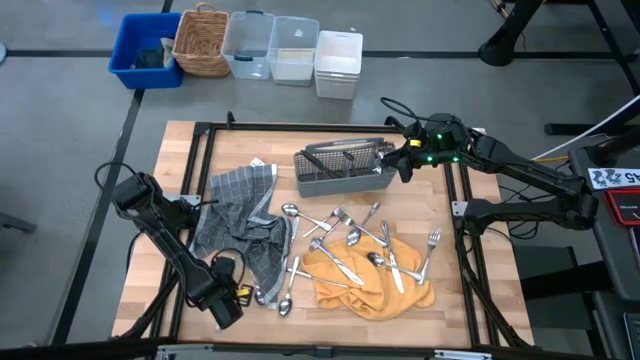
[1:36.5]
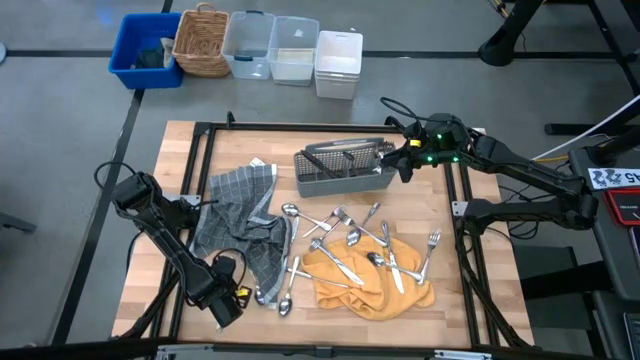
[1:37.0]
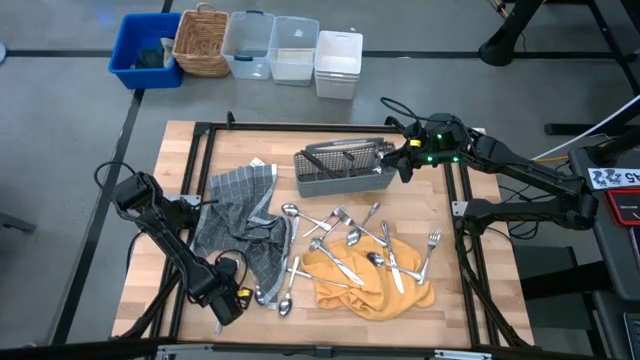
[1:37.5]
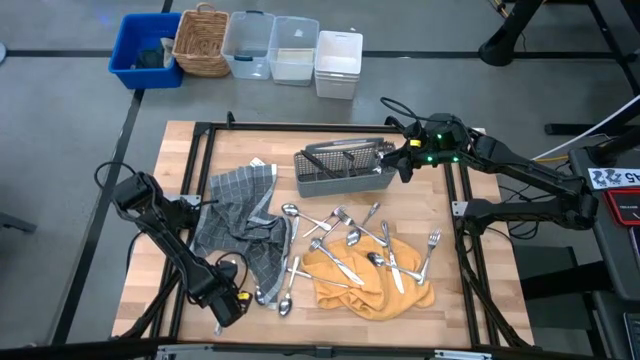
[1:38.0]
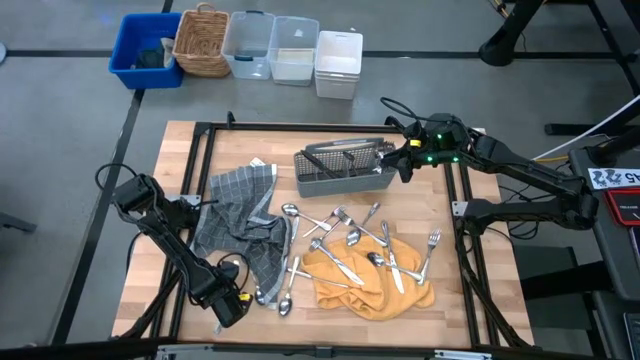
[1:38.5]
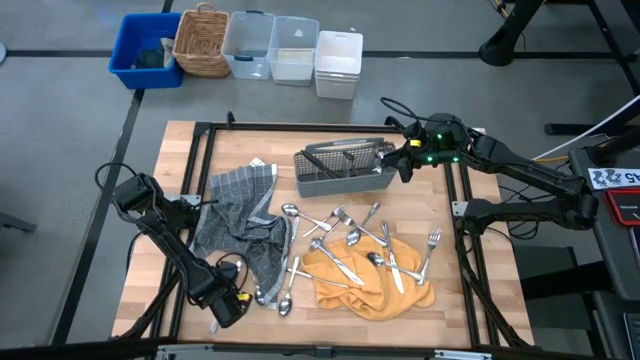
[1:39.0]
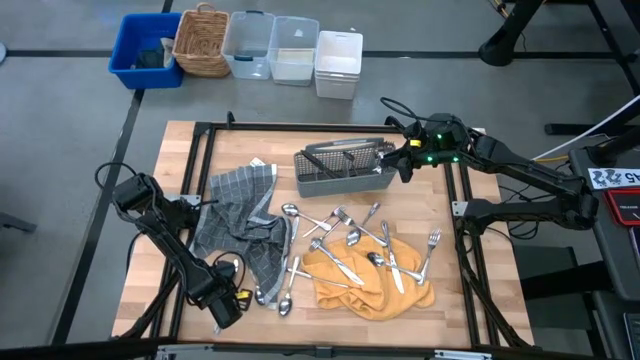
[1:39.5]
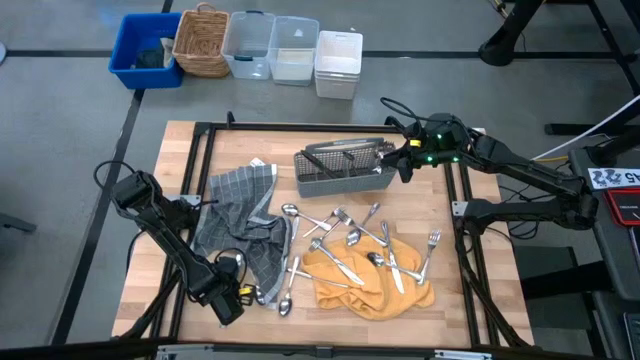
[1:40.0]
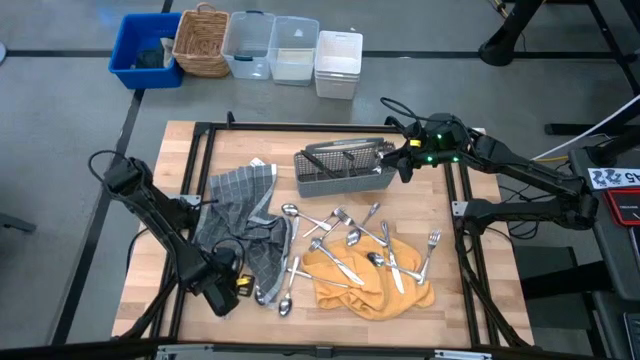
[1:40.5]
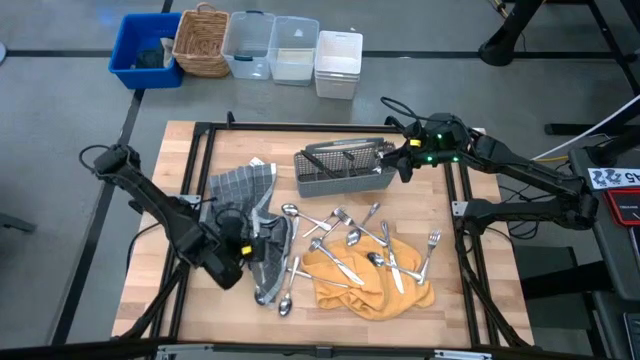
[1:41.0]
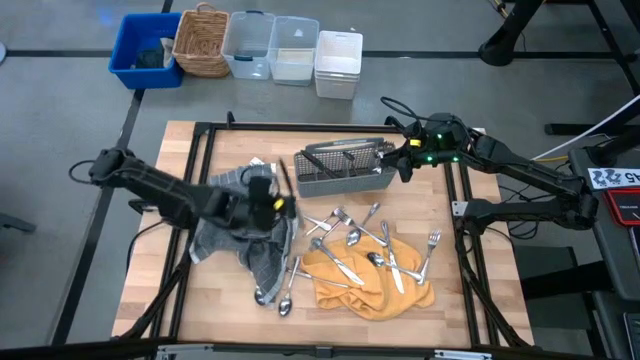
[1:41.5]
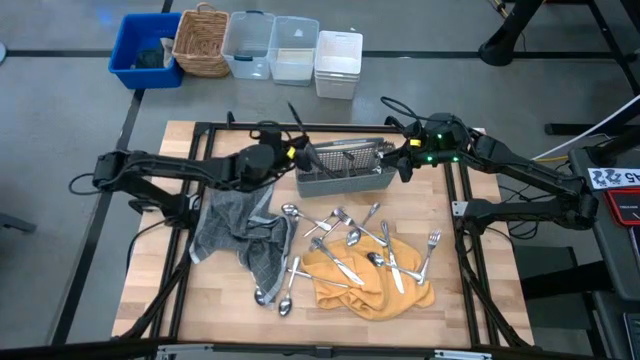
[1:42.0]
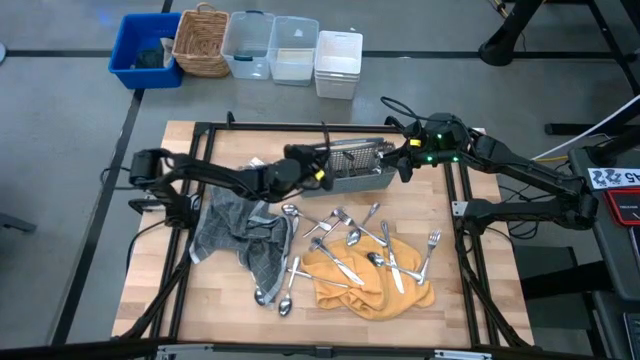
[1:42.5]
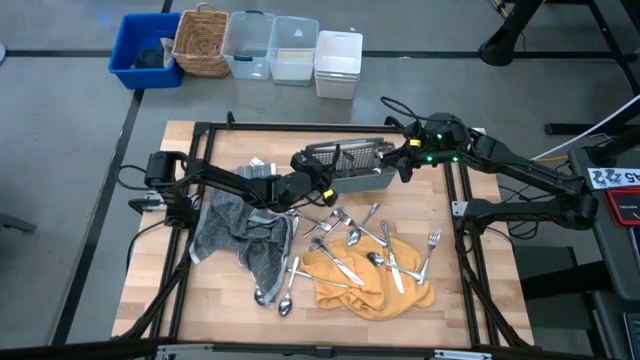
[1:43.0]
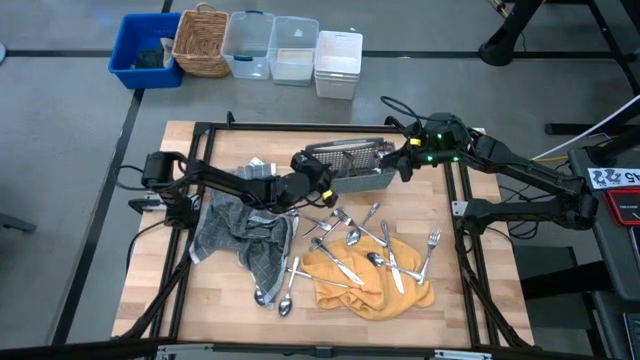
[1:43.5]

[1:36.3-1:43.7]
Task: Sort silverware
Put the silver knife into the gray utensil holder

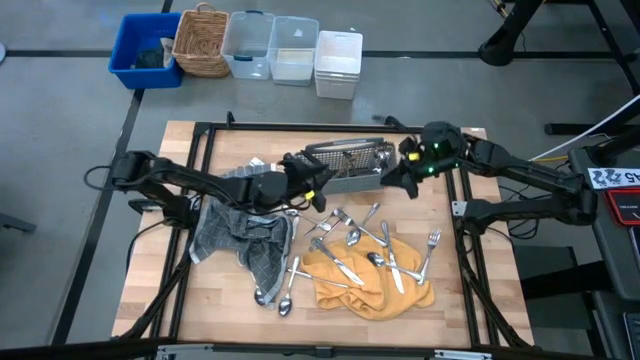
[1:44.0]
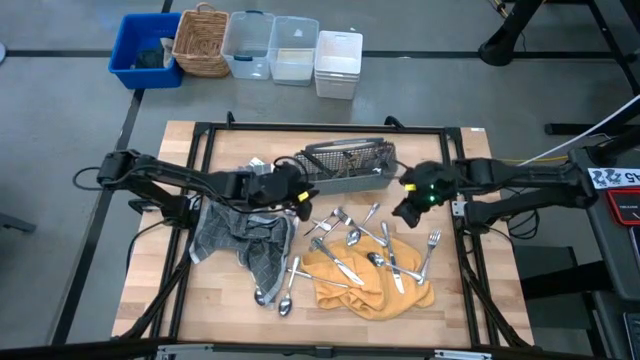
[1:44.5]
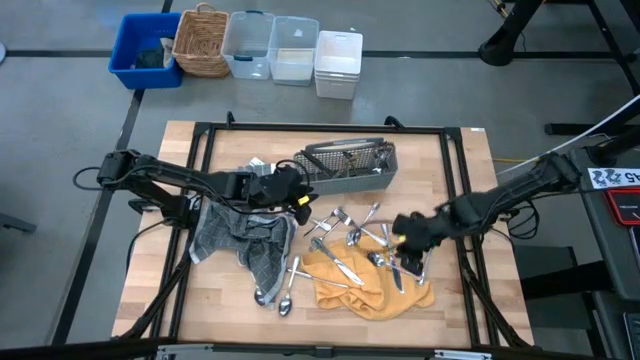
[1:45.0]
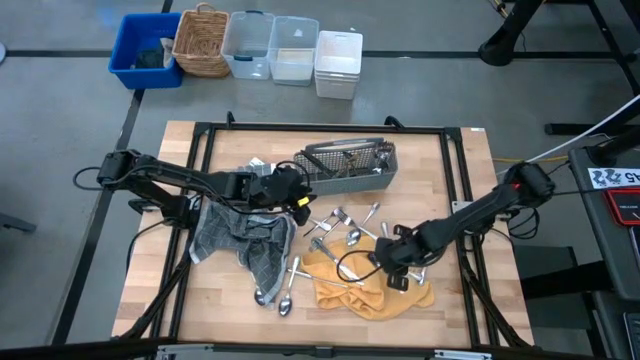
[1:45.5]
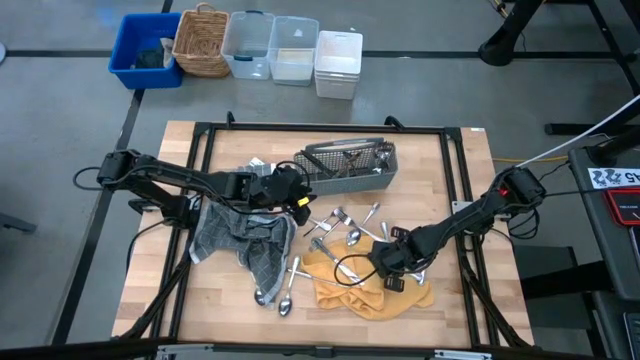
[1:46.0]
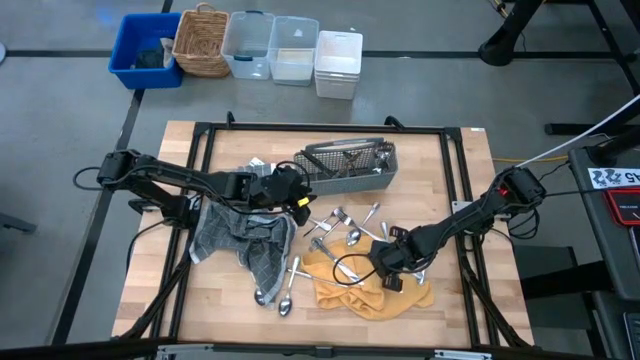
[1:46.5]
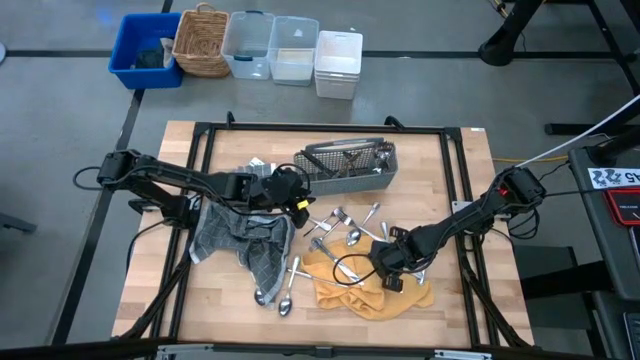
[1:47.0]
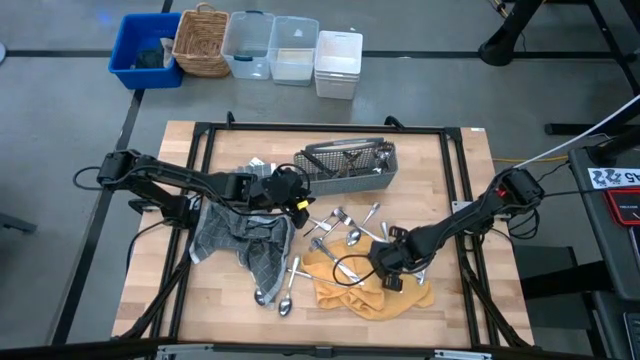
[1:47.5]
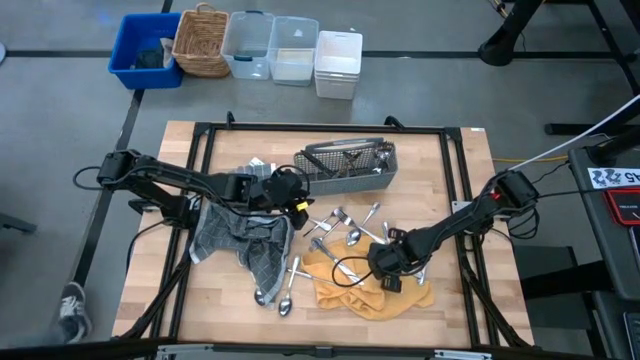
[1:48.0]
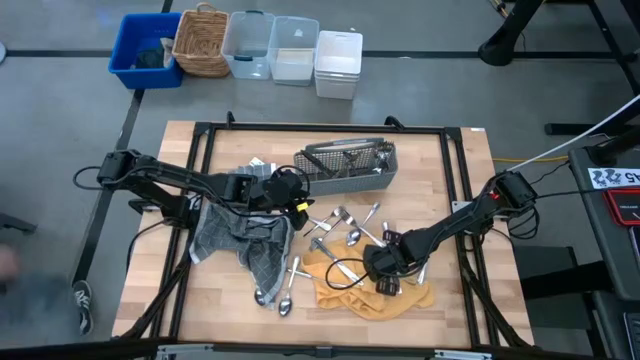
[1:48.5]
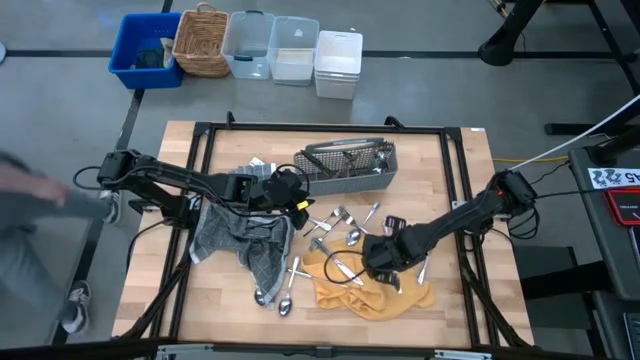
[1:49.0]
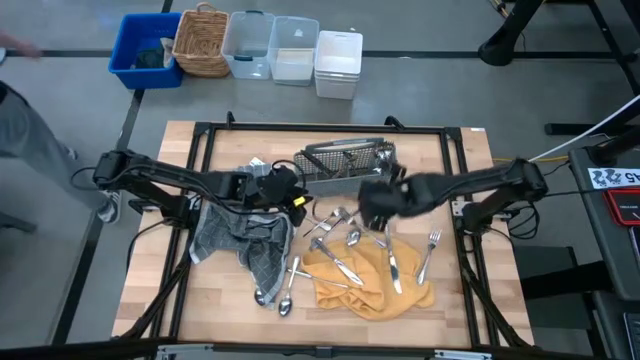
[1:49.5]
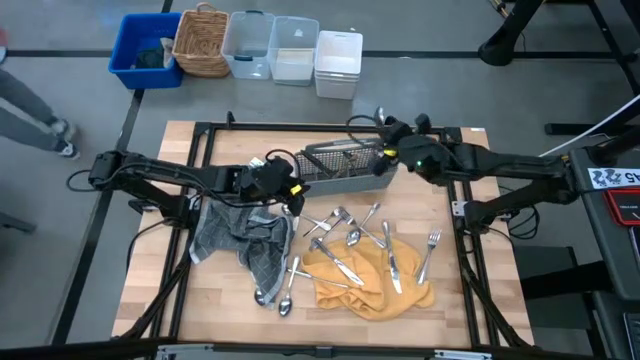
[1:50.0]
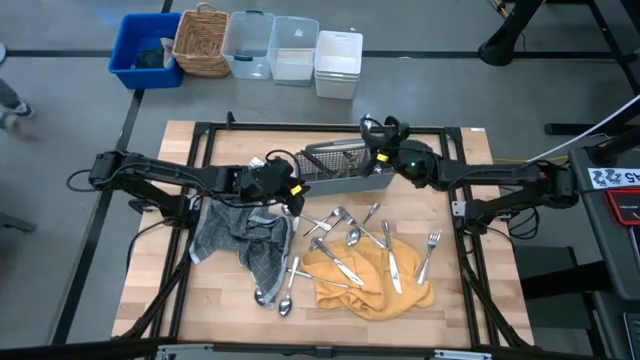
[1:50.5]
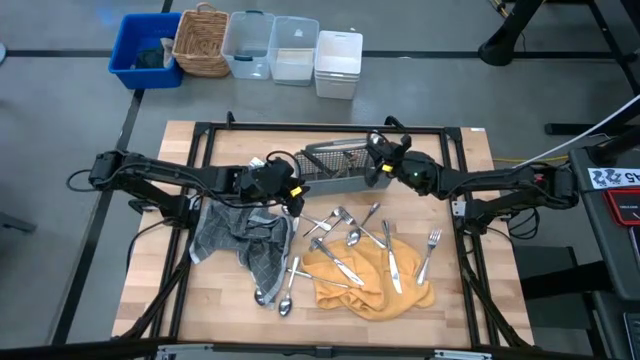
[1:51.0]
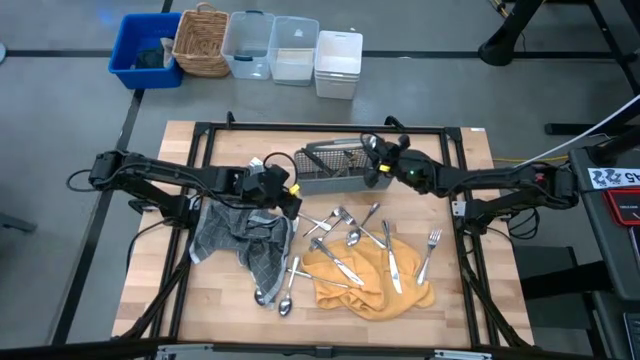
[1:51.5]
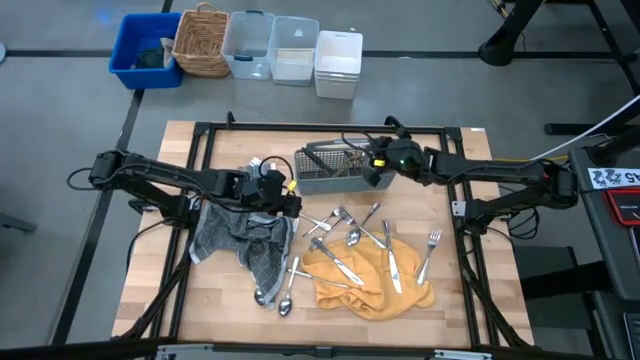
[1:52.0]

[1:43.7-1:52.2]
Put the silver spoon into the gray utensil holder

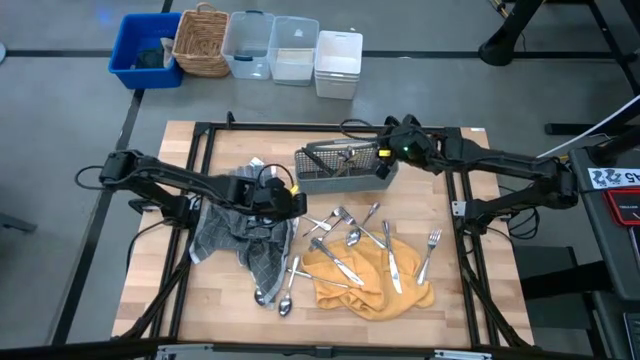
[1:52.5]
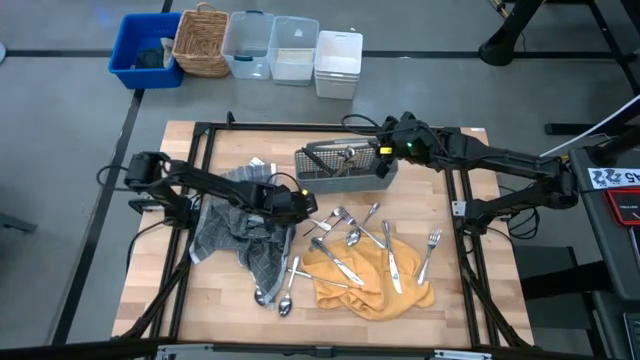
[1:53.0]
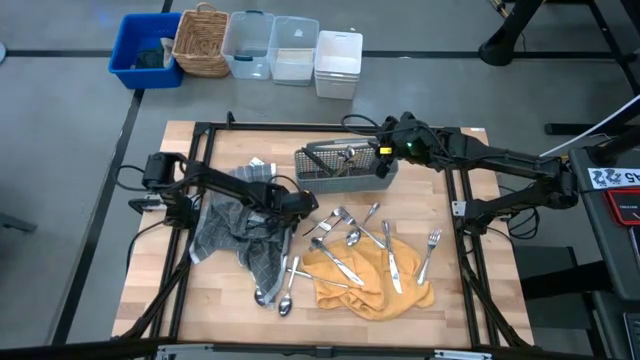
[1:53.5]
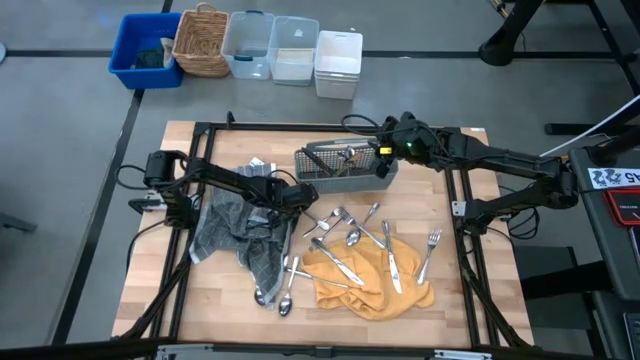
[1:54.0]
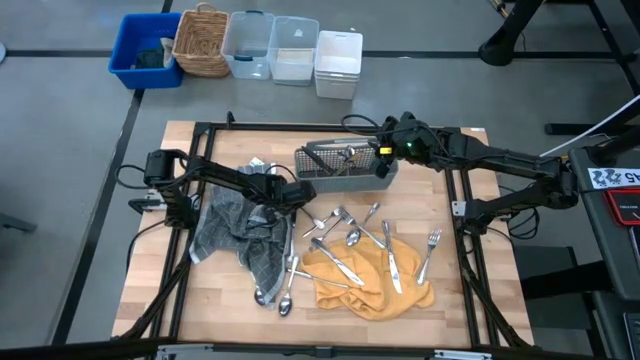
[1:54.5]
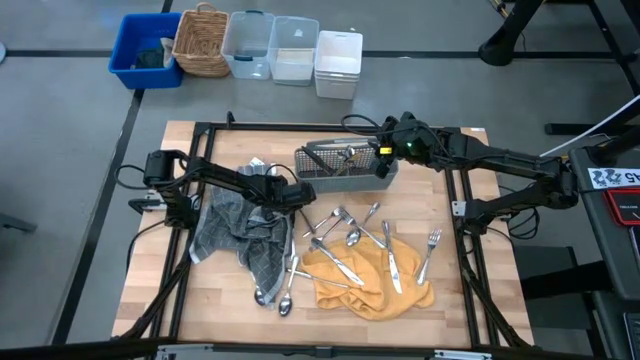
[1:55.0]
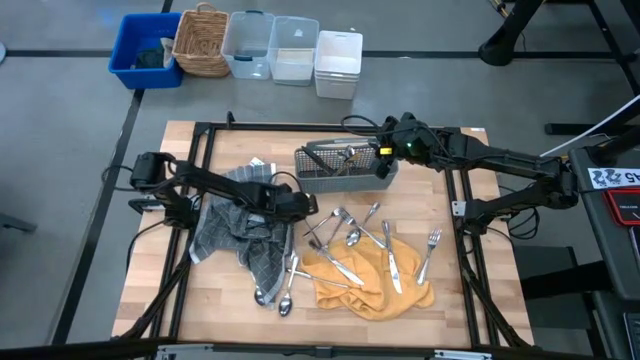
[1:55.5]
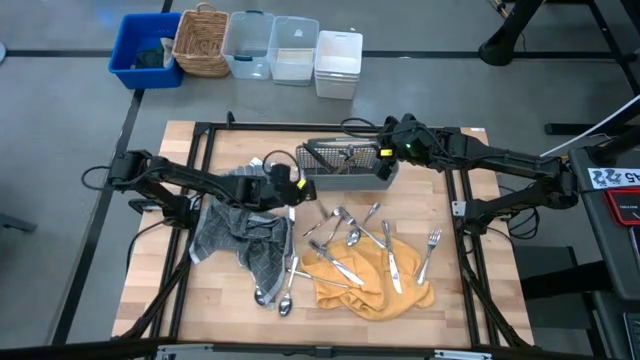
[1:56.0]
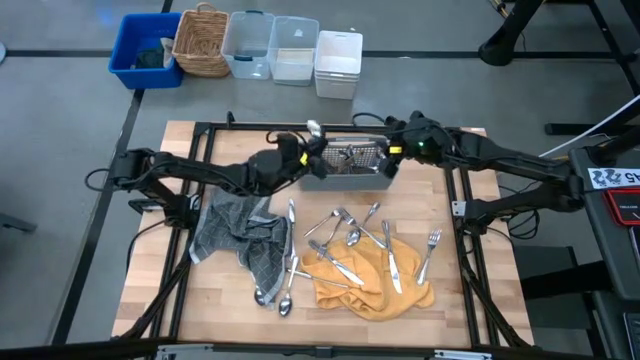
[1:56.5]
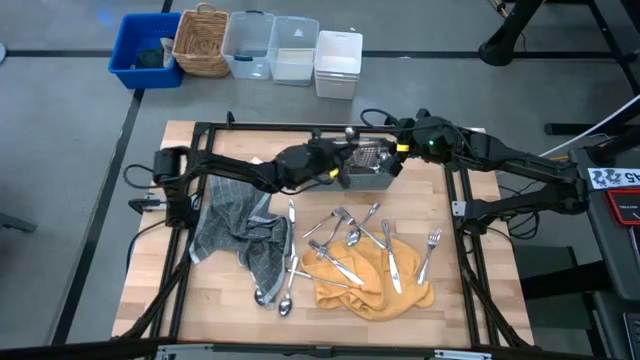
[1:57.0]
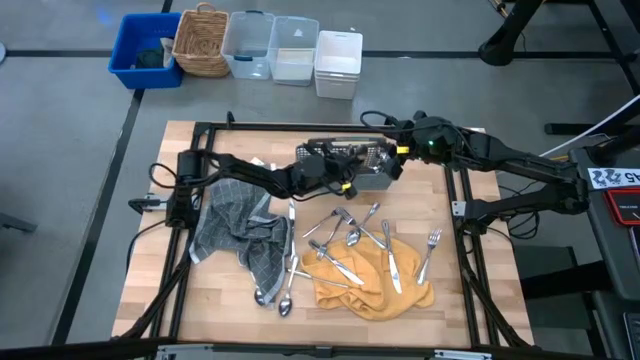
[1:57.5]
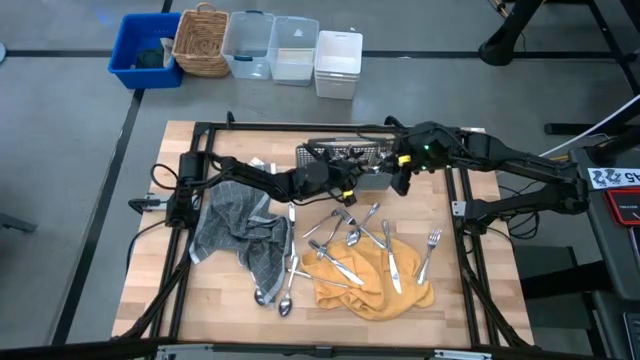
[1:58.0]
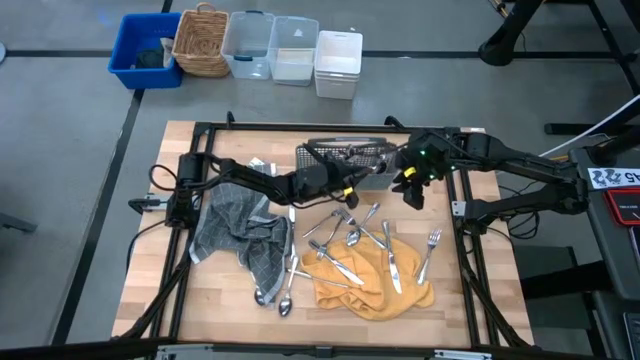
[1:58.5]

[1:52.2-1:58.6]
Put the silver spoon into the gray utensil holder
